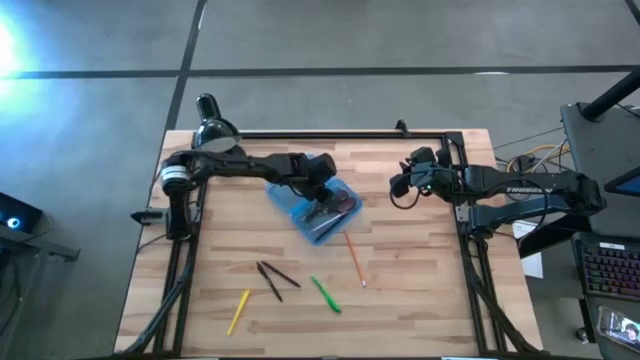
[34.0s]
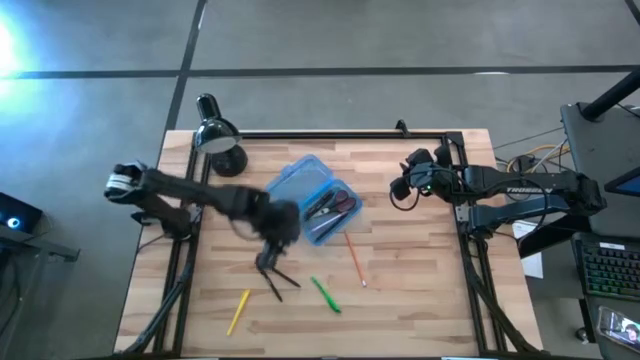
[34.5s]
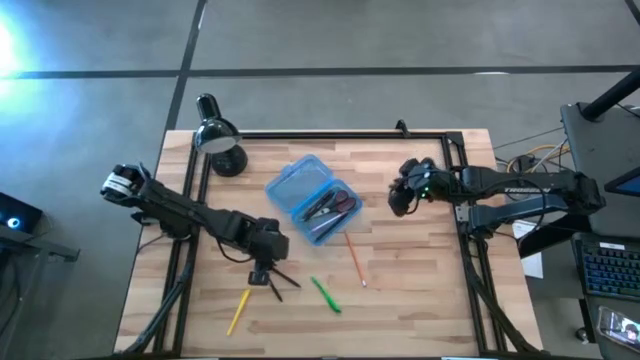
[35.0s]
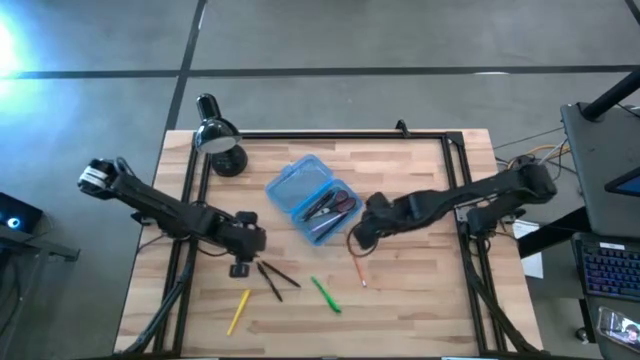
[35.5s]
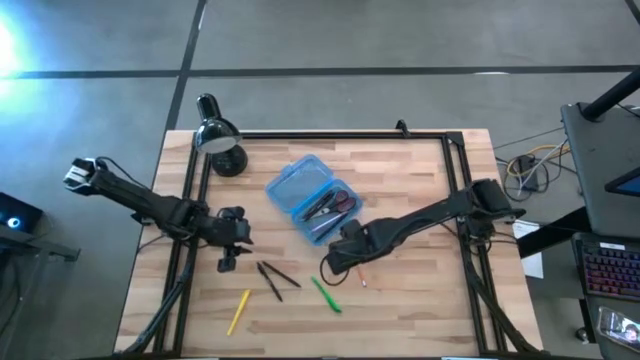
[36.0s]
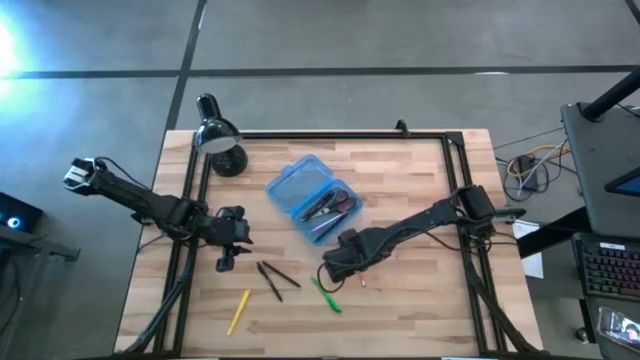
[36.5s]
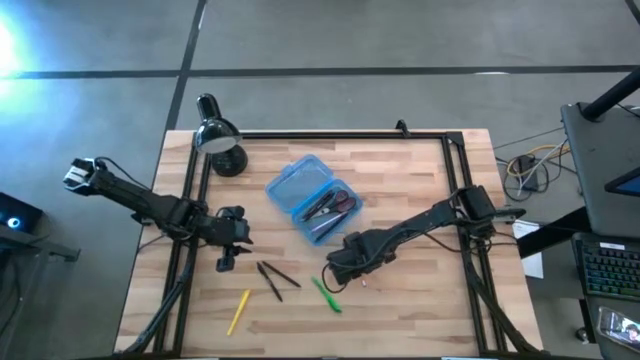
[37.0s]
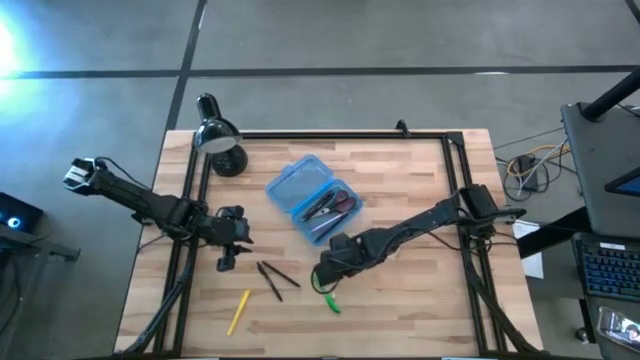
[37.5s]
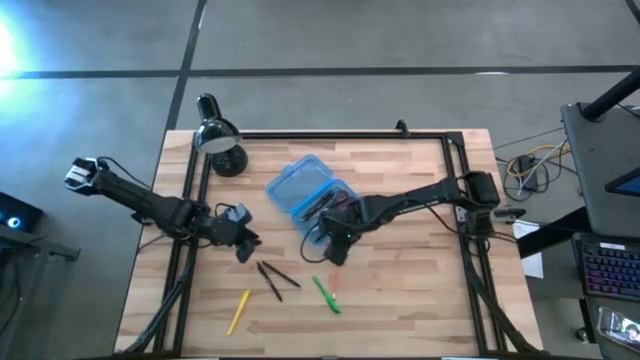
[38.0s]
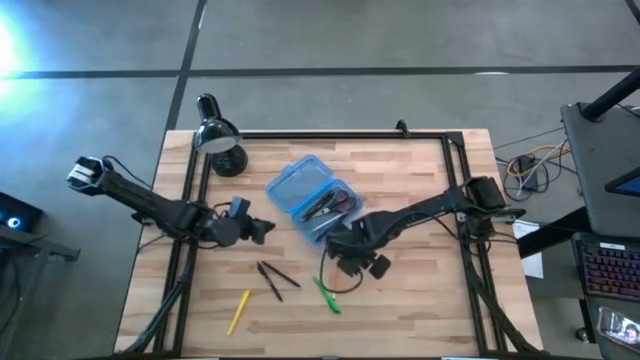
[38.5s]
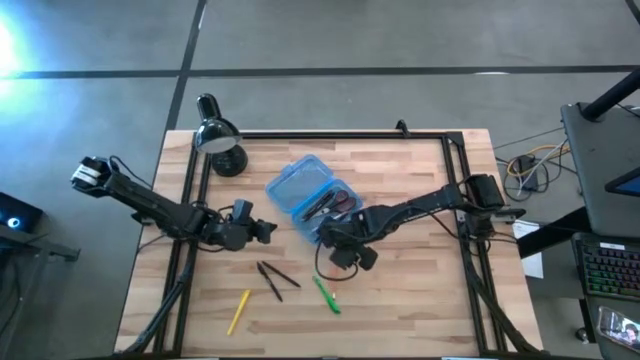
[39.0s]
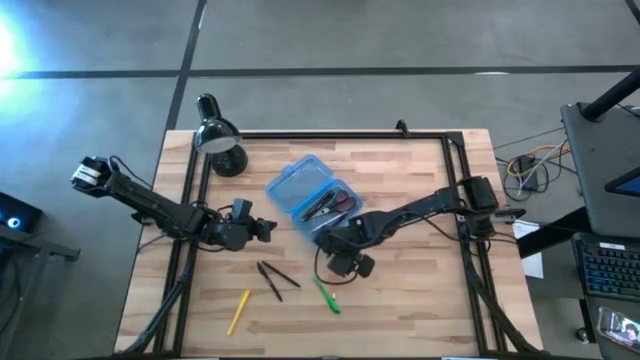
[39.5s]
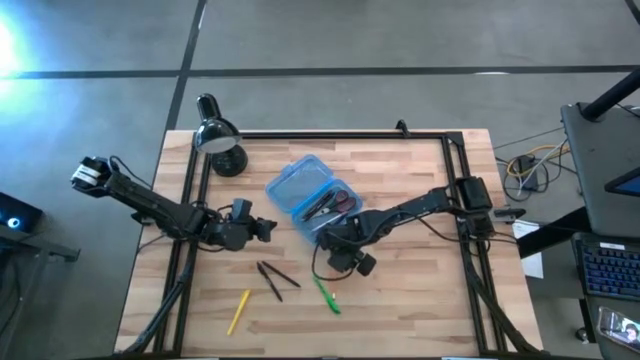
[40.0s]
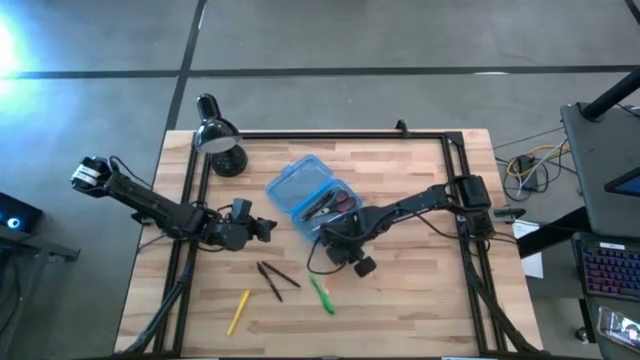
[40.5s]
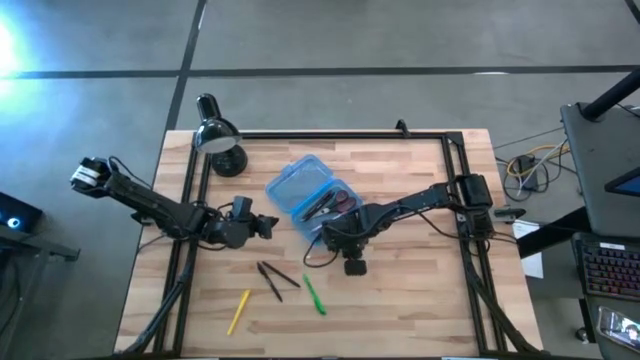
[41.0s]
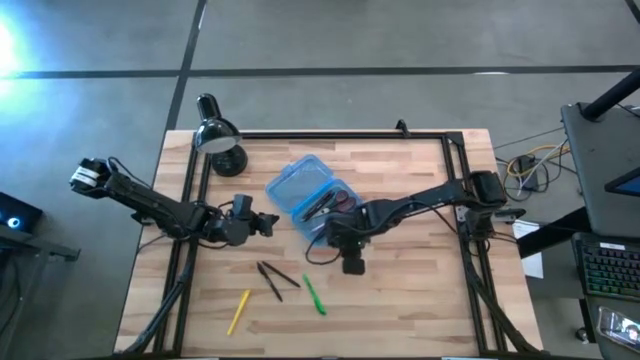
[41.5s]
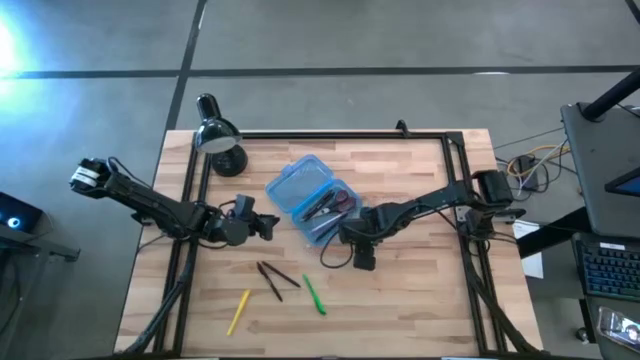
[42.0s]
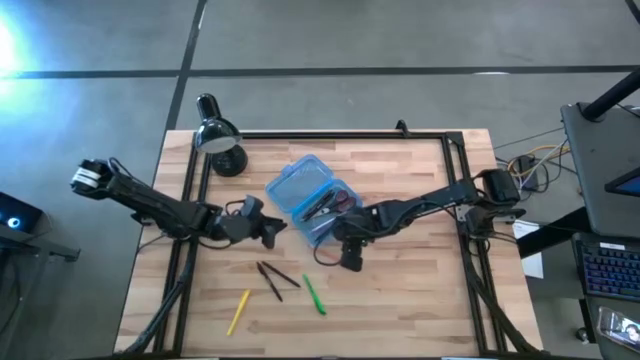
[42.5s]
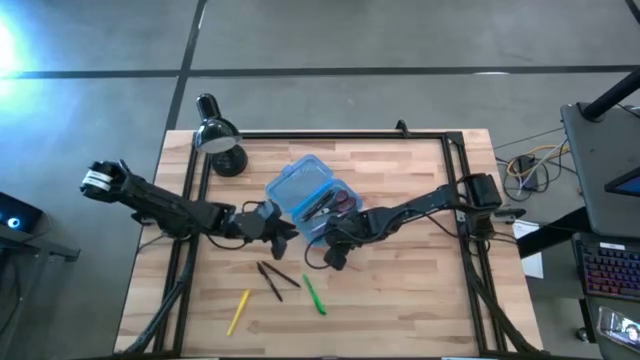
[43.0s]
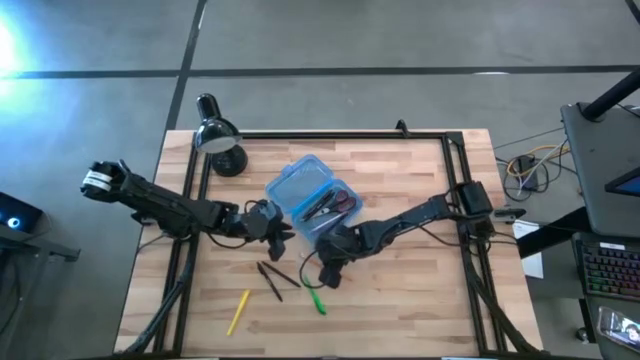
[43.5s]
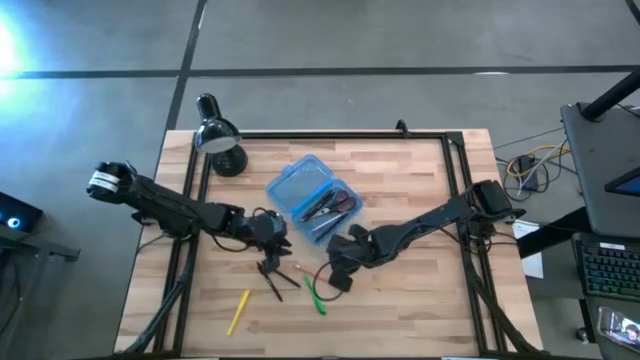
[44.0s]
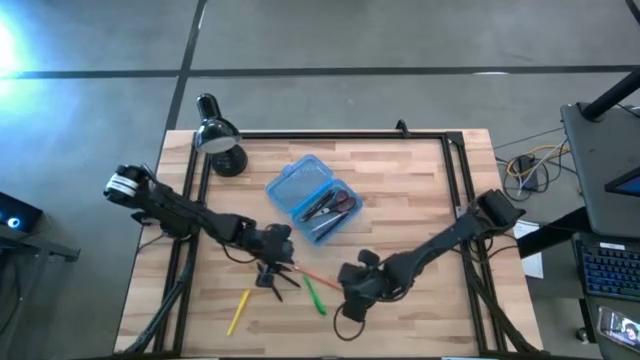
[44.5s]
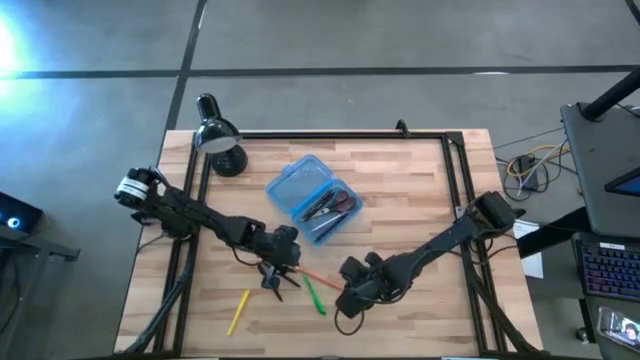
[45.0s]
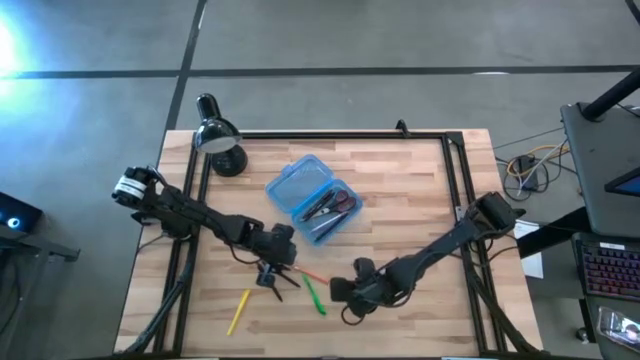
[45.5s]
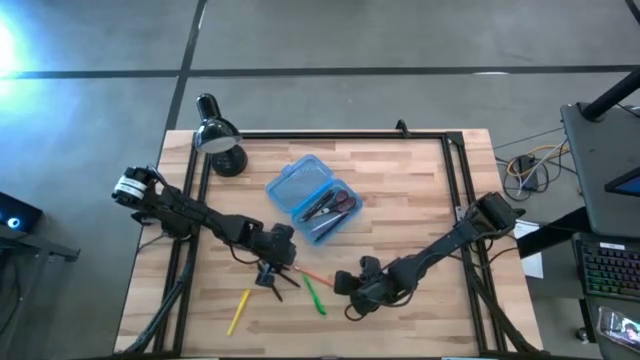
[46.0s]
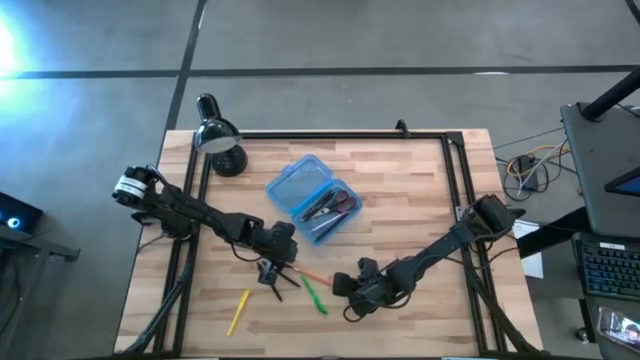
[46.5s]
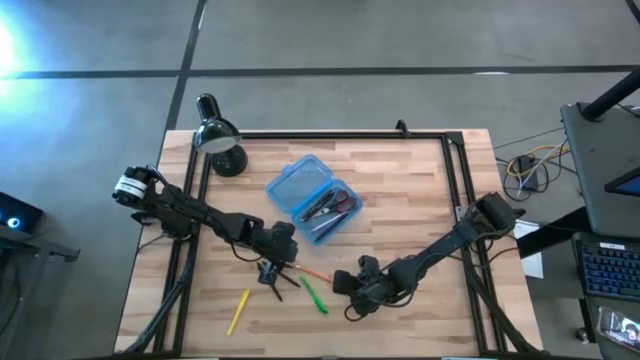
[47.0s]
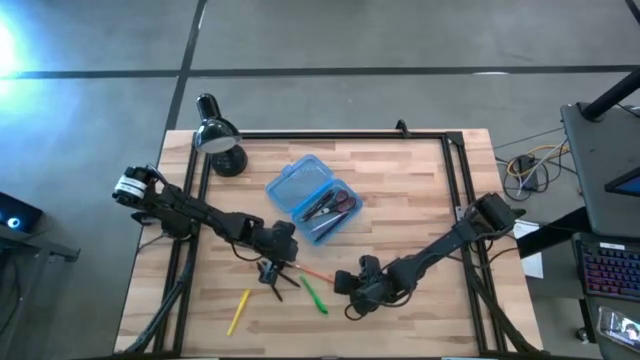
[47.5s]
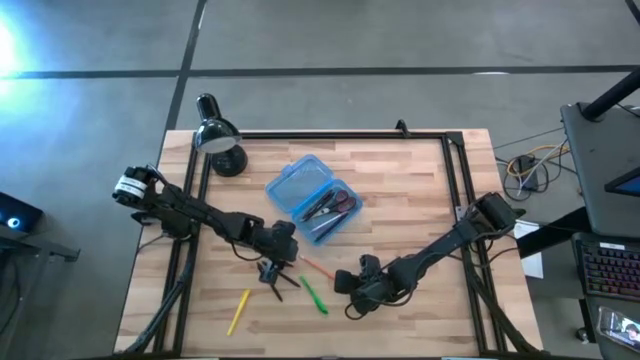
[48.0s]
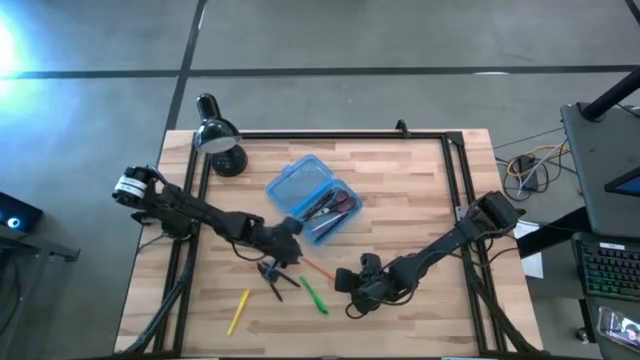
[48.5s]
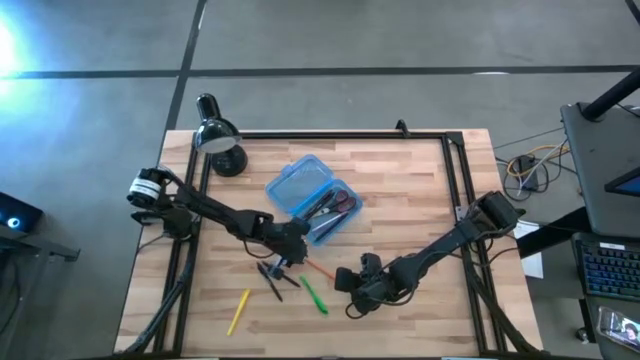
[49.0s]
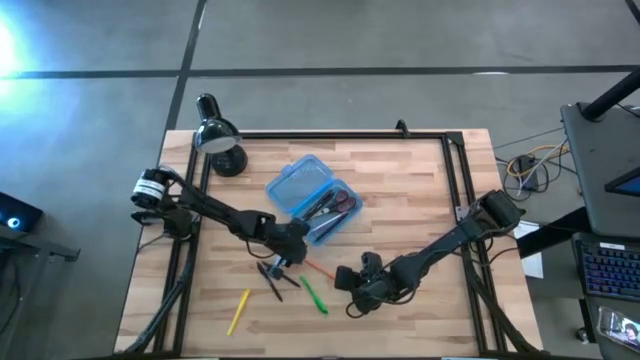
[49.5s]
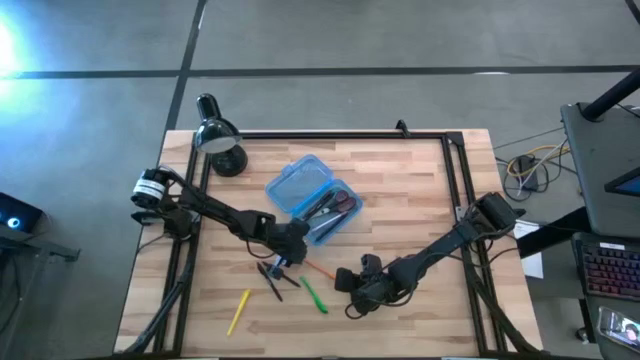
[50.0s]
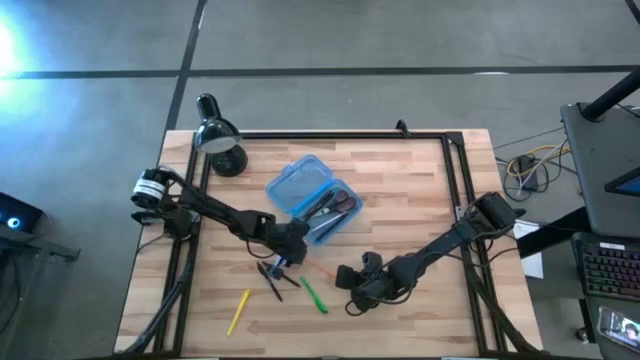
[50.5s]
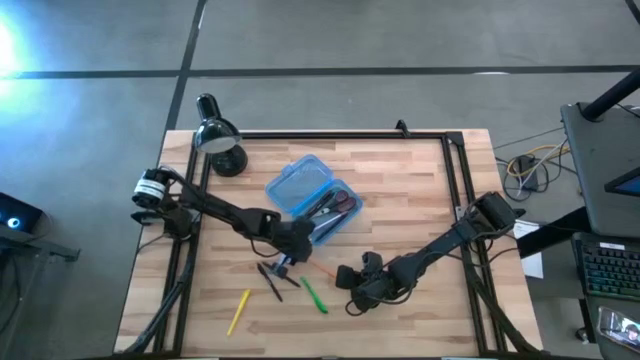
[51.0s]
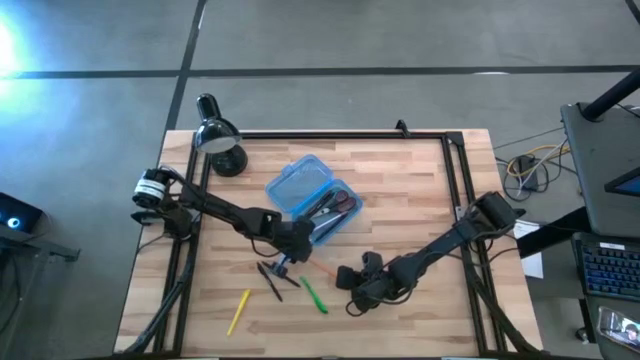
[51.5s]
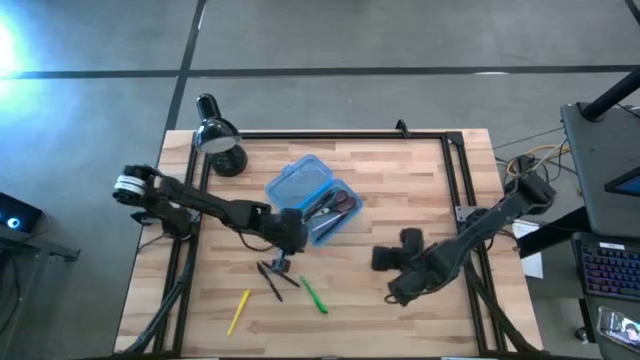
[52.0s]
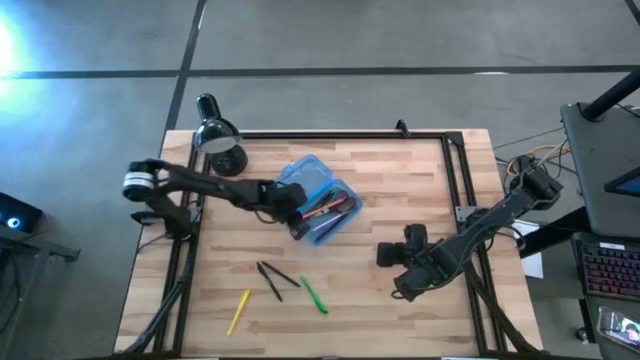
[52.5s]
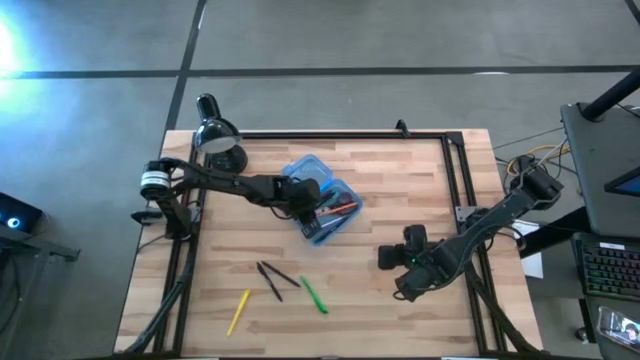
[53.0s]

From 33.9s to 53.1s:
Task: Pick & place school supplies into a supply box
Put the pencil into the supply box

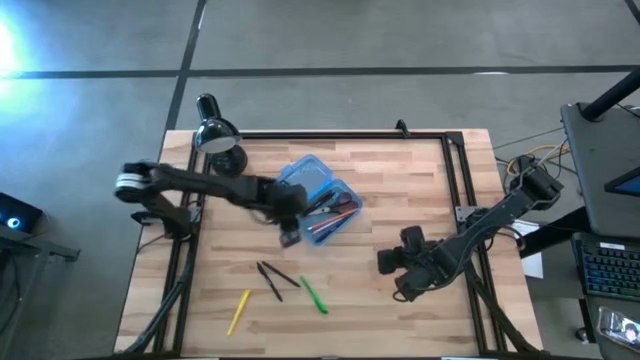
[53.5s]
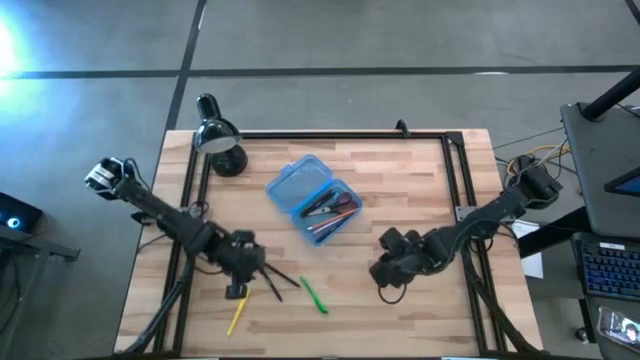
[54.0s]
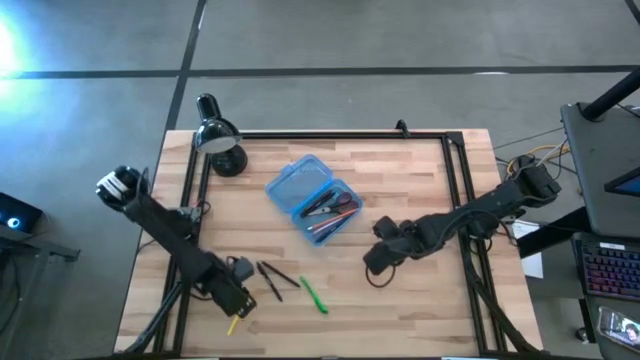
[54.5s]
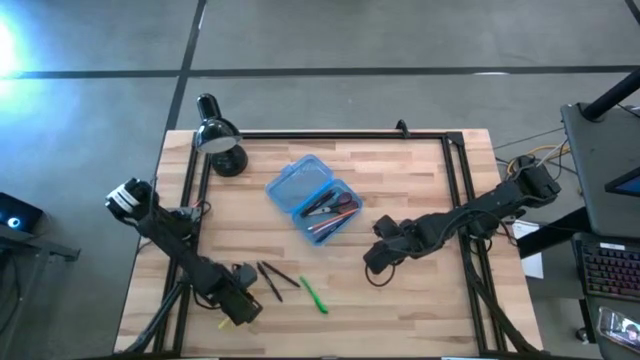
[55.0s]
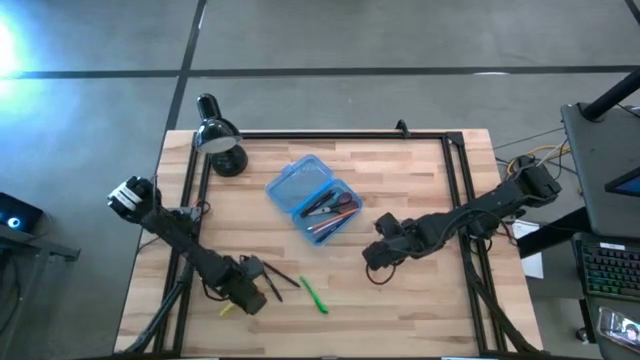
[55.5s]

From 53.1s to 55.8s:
Put the yellow pen into the supply box

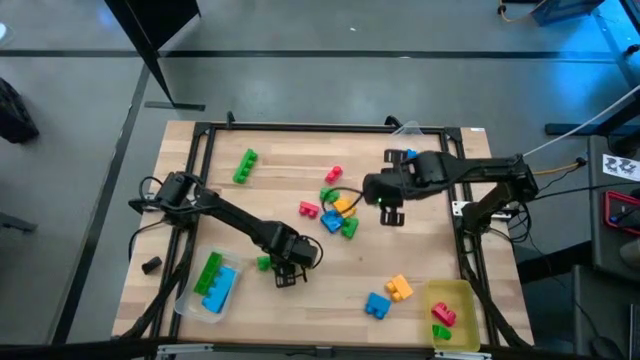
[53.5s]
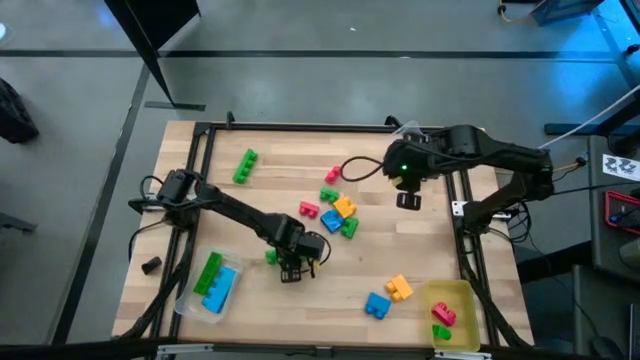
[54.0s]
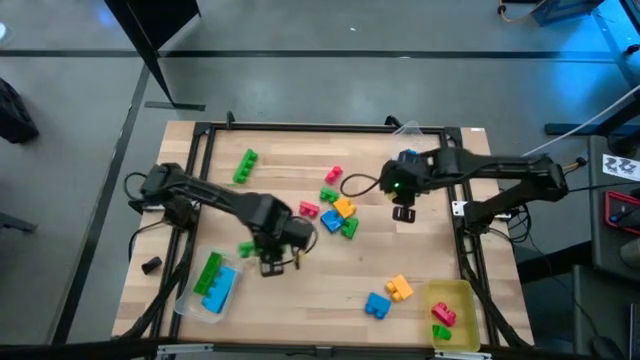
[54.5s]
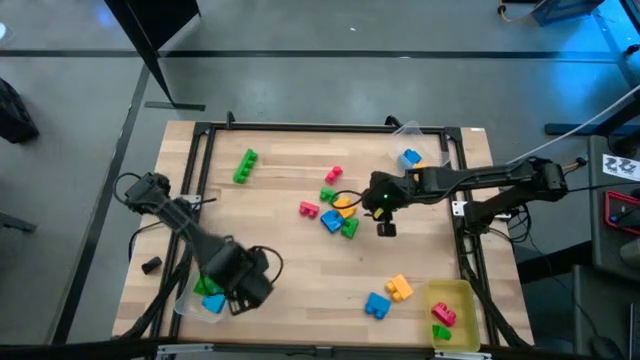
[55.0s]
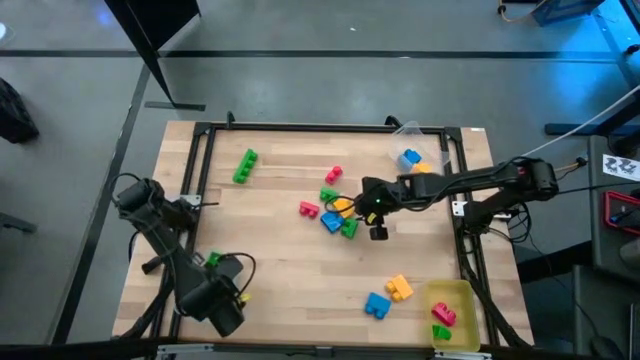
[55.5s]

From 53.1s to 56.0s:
Task: Sort blocks by size
Put the bottom 4 stud green game piece into the bottom transparent bin
